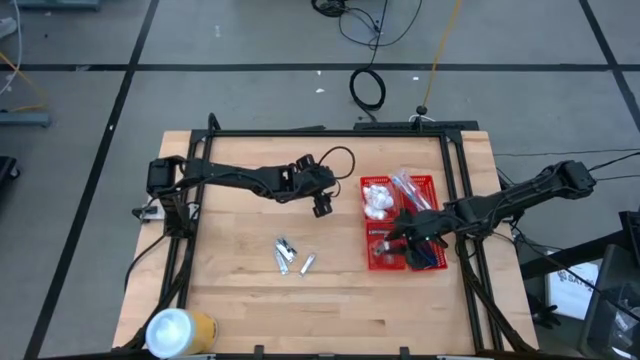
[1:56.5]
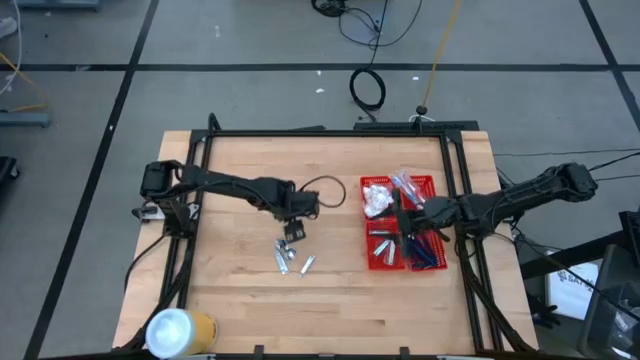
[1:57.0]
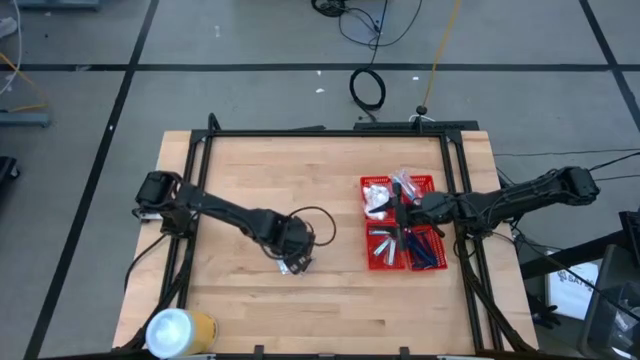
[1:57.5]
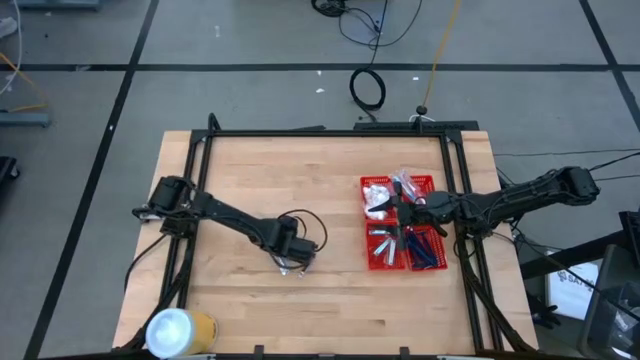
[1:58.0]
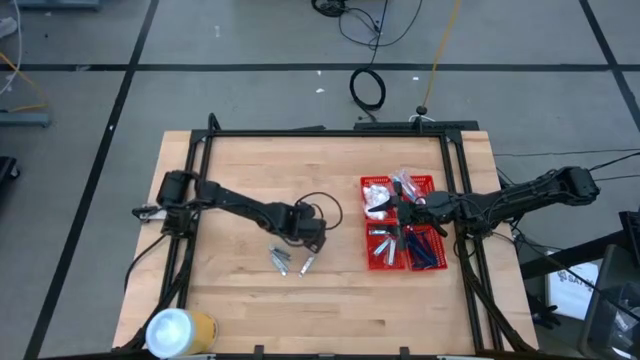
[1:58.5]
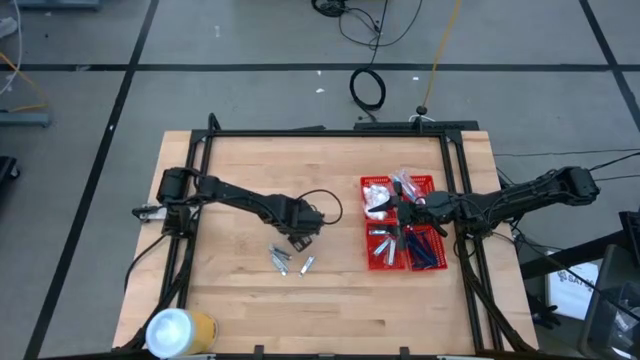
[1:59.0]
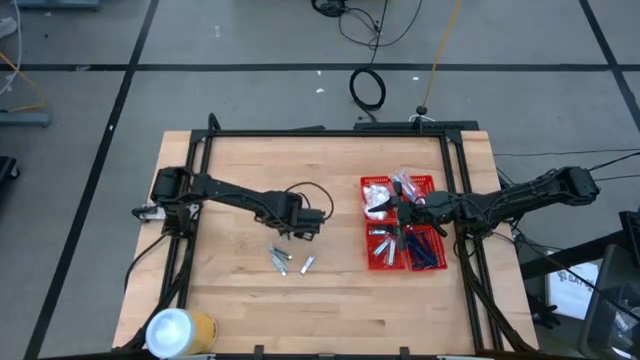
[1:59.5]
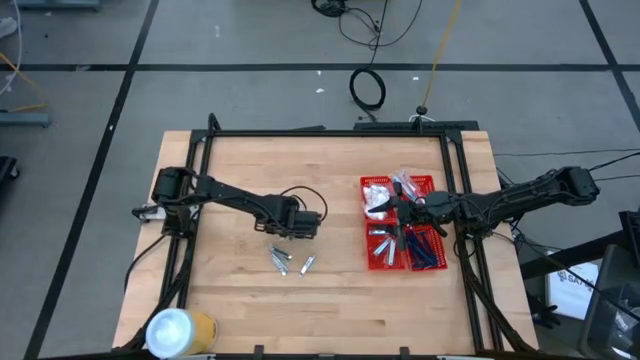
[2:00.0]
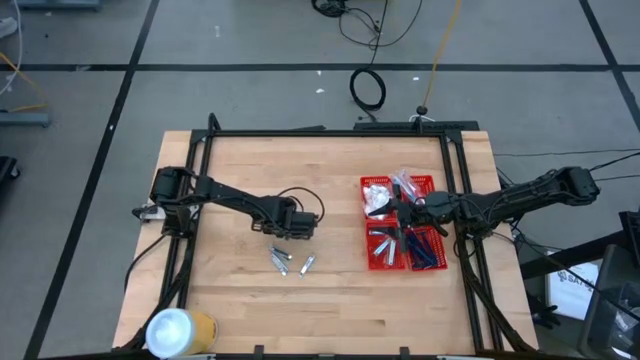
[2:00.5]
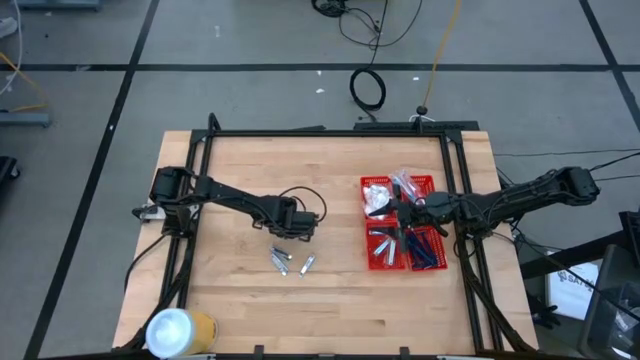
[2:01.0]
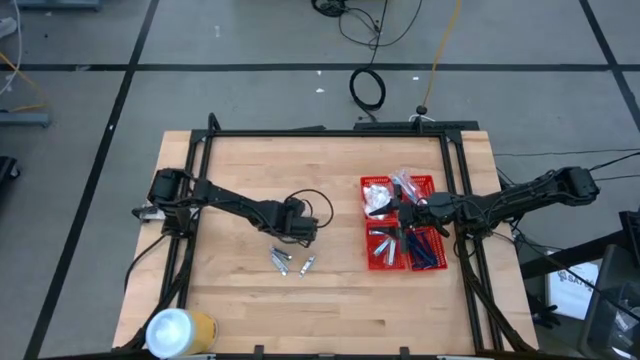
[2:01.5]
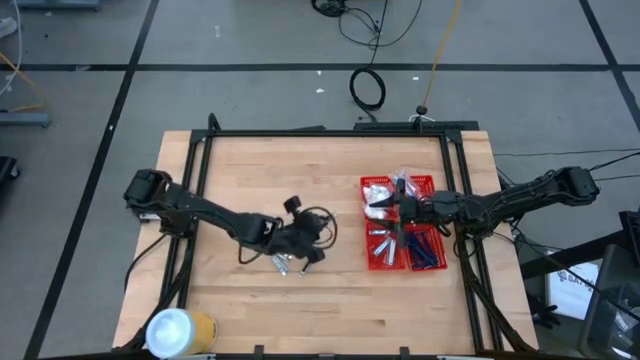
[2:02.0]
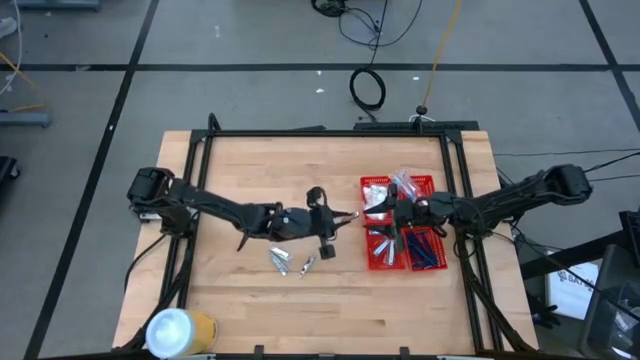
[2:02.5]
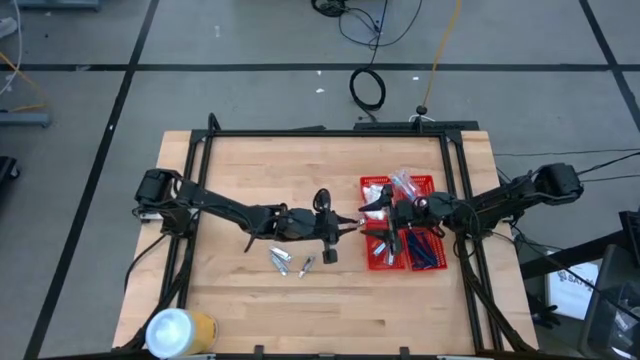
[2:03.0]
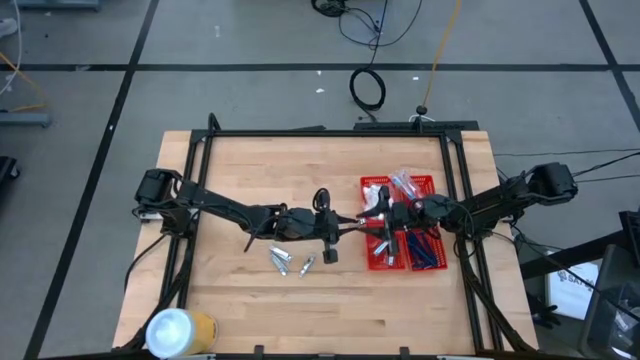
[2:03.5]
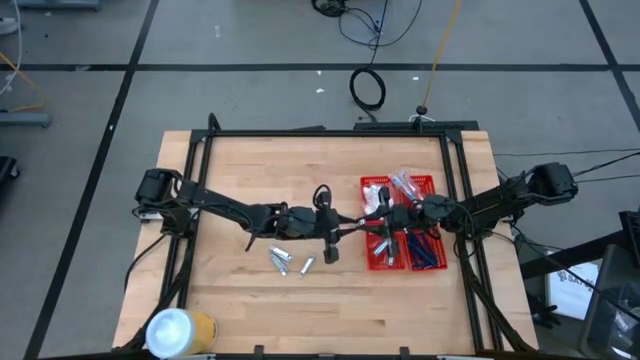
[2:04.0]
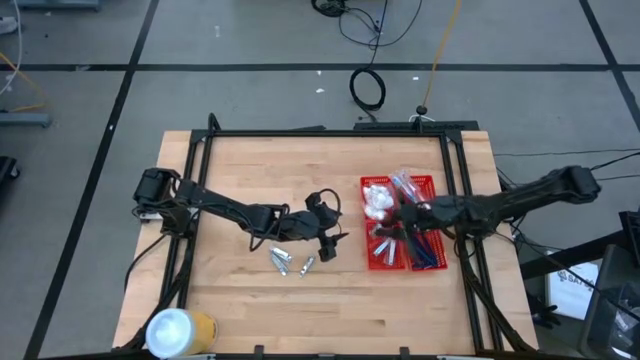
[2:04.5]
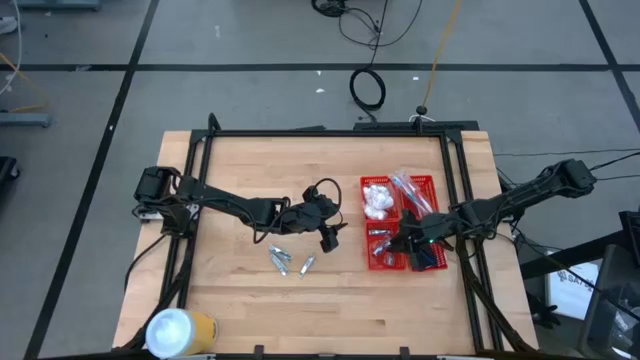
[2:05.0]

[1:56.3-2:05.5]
Task: Pick & Place Travel size toiletries
Put the nail cutter into the bottom left red bin

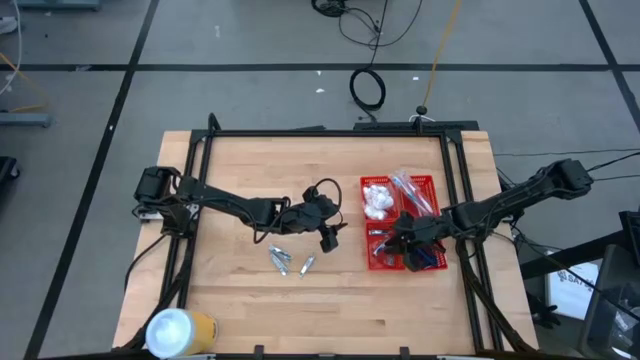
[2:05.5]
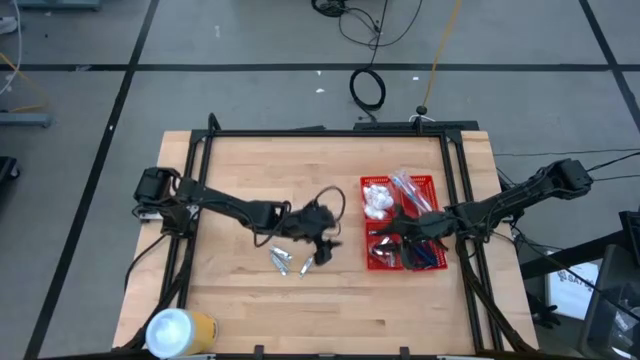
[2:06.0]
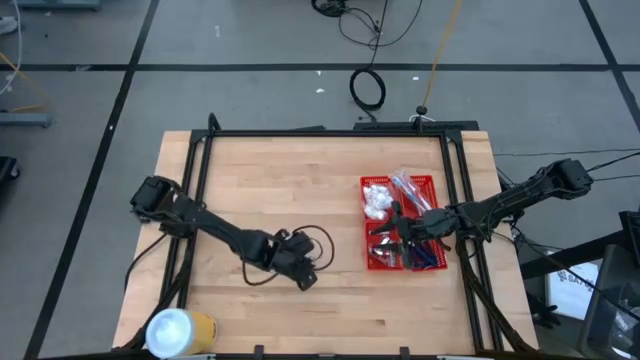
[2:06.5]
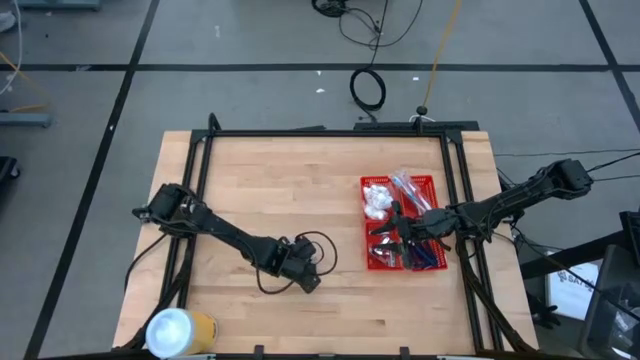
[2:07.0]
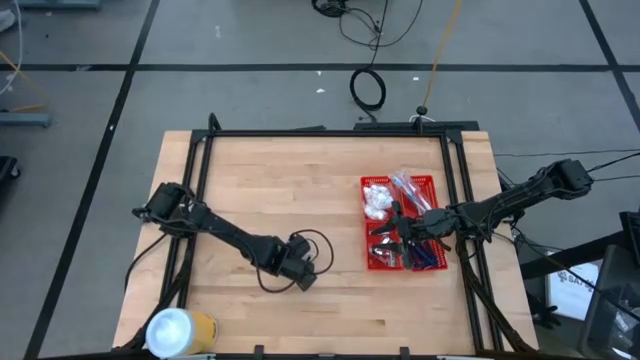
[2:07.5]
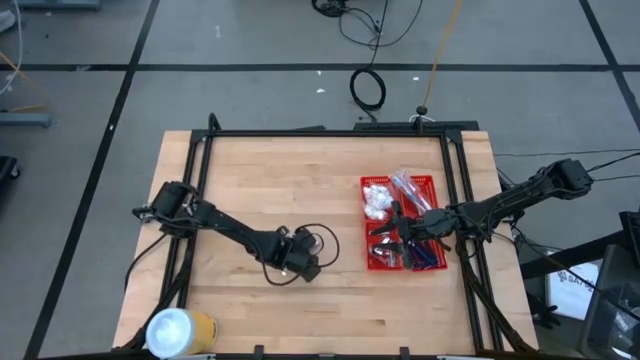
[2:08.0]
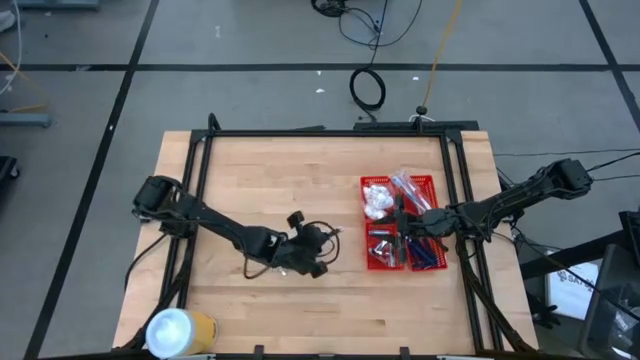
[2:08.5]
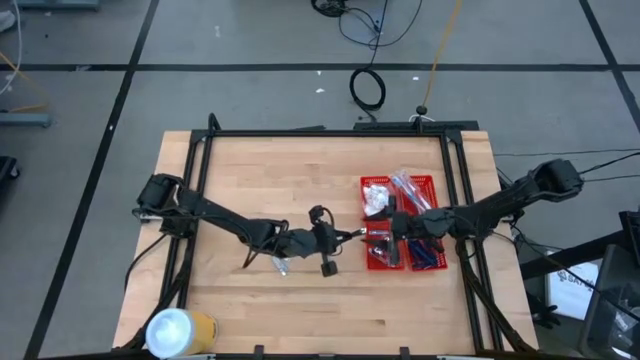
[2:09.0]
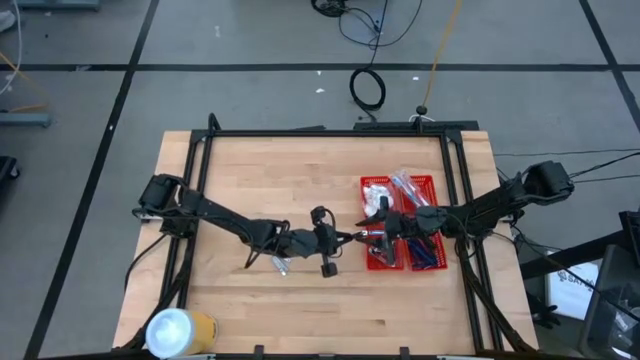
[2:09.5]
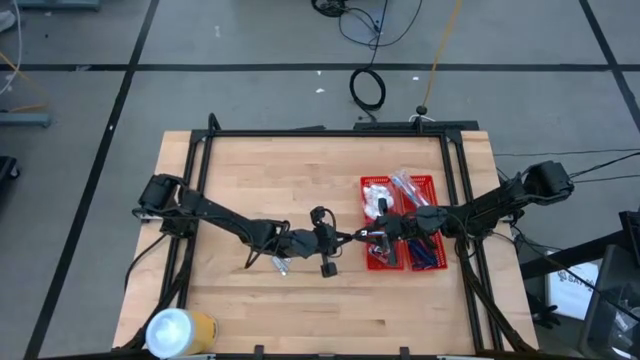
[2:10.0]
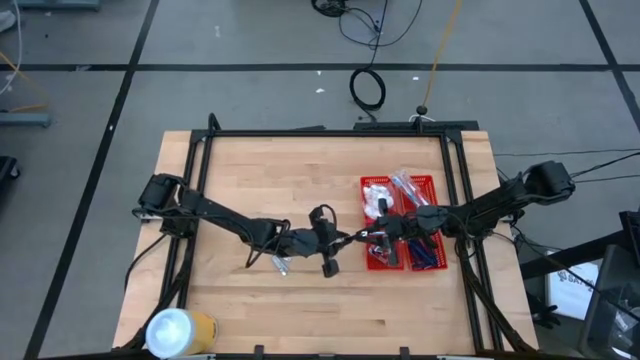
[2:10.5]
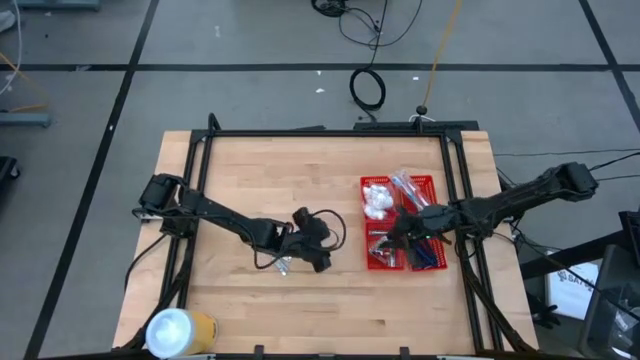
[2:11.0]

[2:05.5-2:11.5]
Put the nail cutter into the bottom left red bin

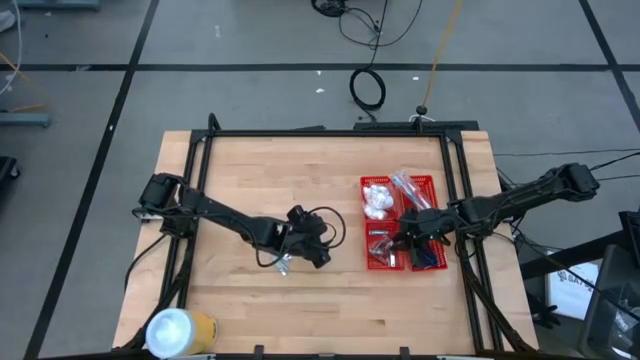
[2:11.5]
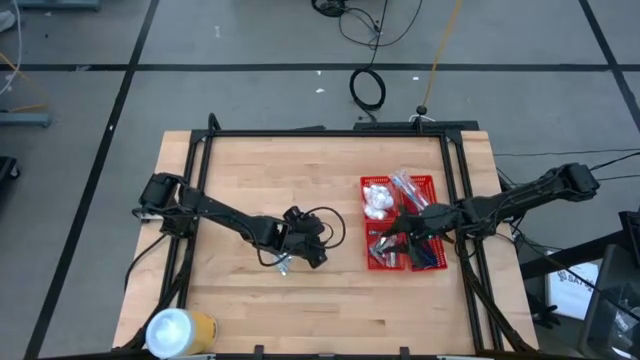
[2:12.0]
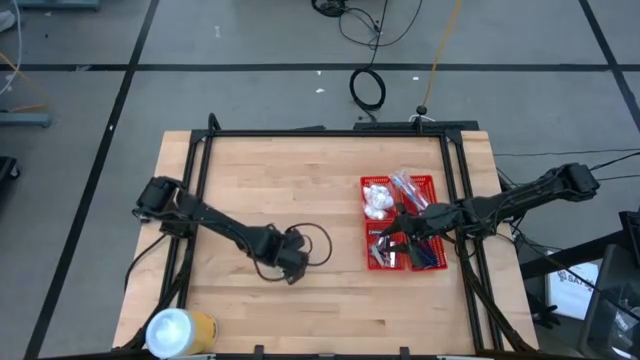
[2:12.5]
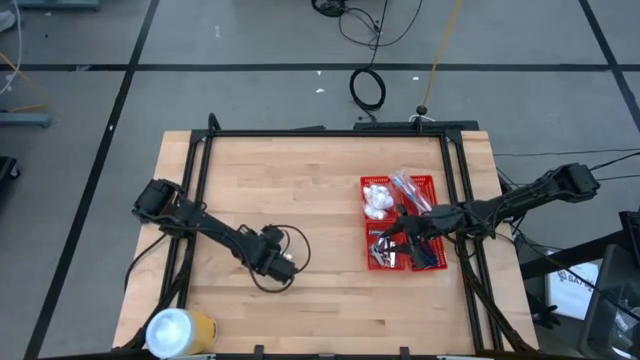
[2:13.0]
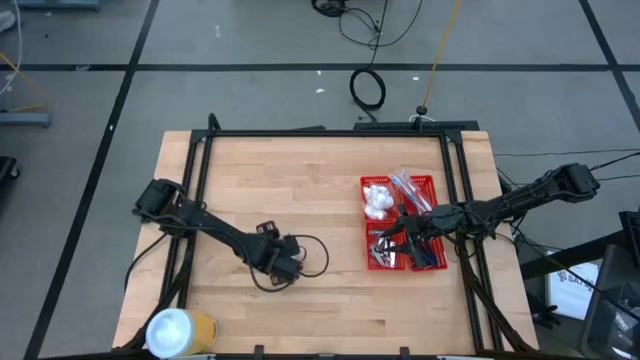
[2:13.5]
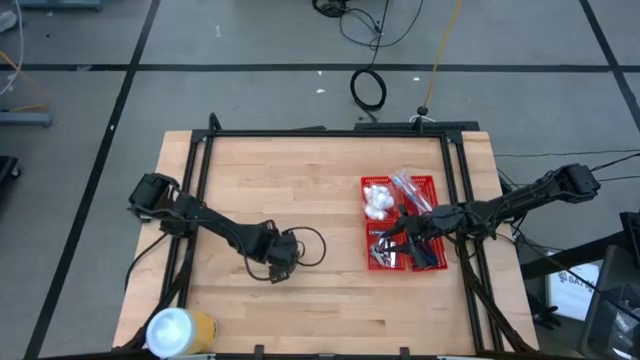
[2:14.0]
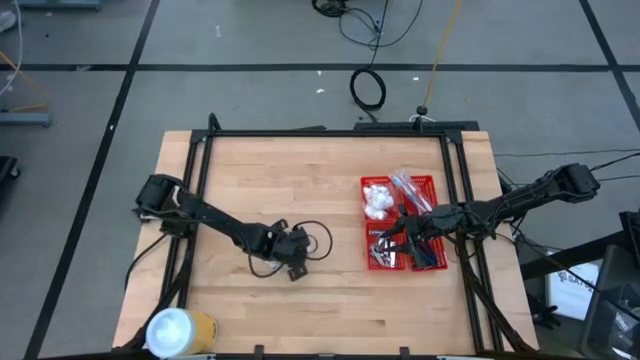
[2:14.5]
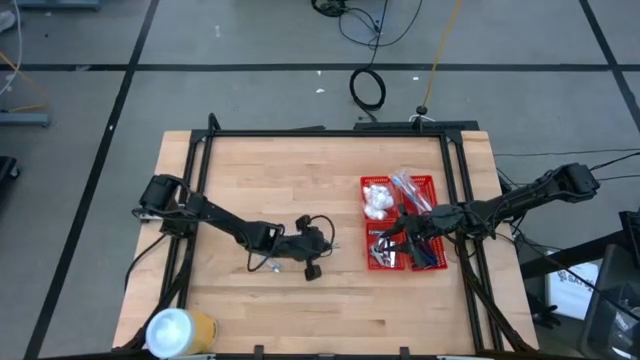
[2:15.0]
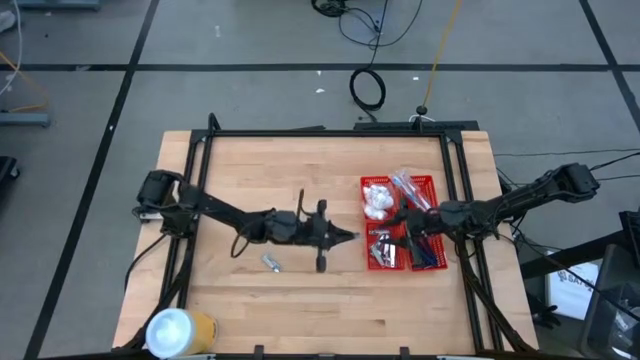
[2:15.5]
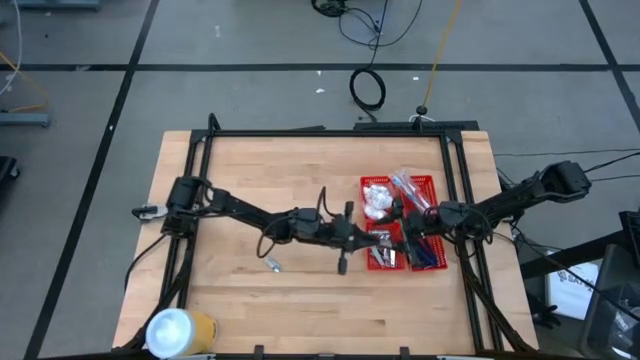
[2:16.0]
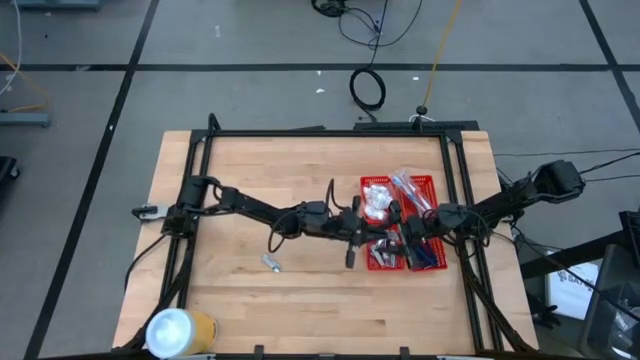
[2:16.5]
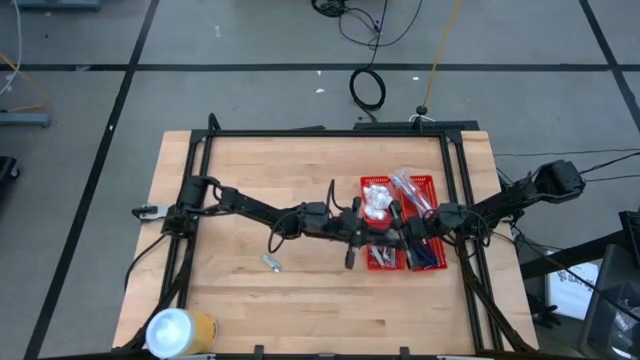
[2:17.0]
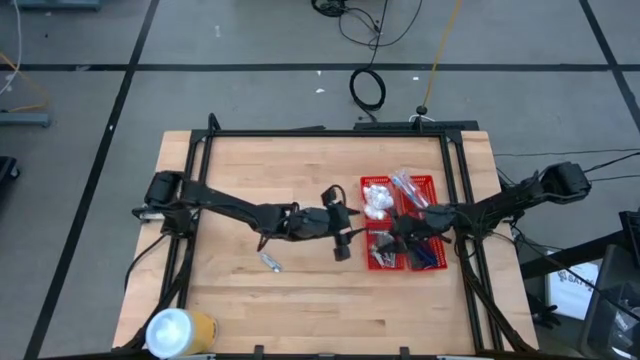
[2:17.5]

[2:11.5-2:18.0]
Put the nail cutter into the bottom left red bin
